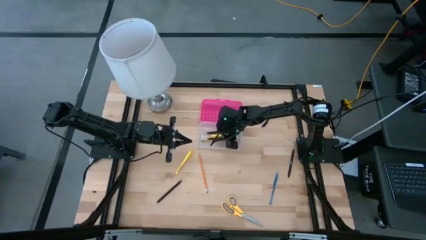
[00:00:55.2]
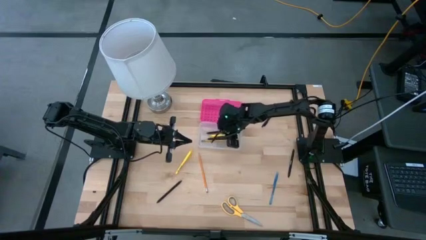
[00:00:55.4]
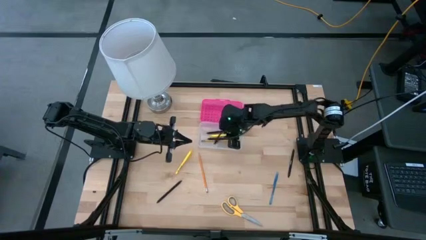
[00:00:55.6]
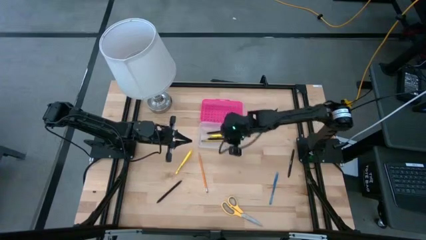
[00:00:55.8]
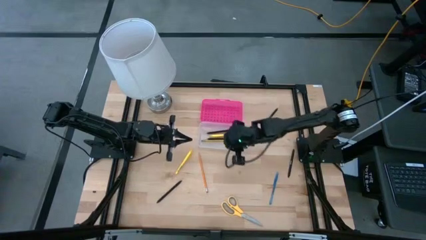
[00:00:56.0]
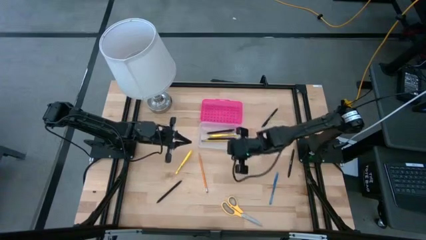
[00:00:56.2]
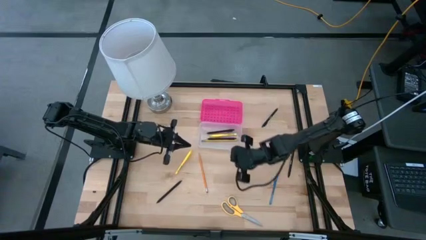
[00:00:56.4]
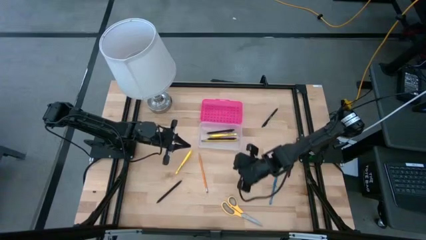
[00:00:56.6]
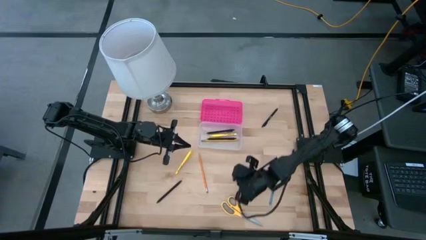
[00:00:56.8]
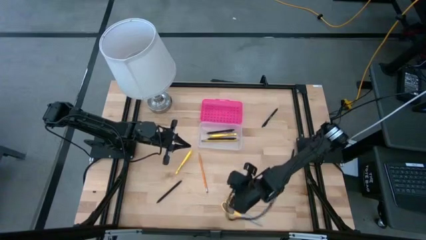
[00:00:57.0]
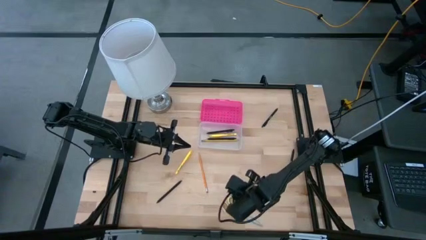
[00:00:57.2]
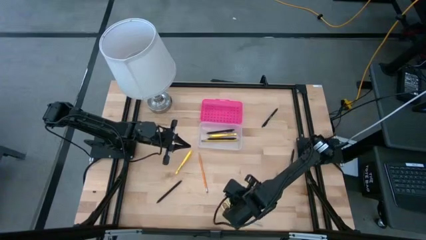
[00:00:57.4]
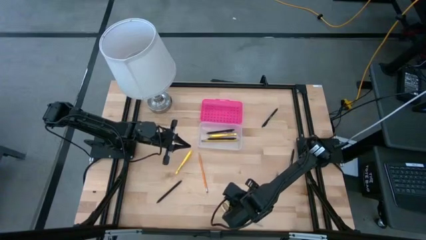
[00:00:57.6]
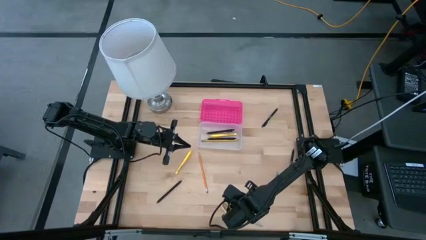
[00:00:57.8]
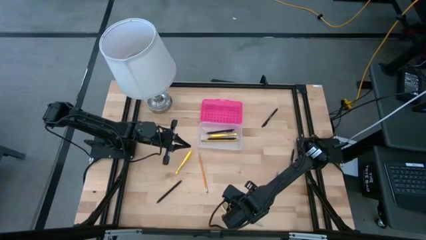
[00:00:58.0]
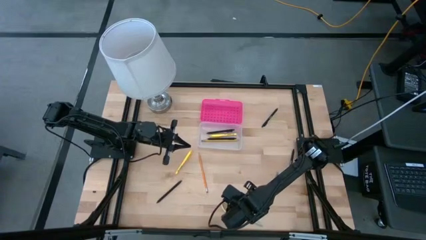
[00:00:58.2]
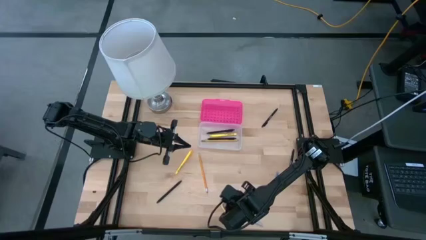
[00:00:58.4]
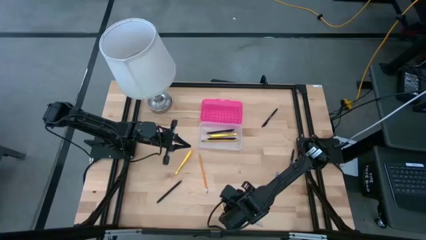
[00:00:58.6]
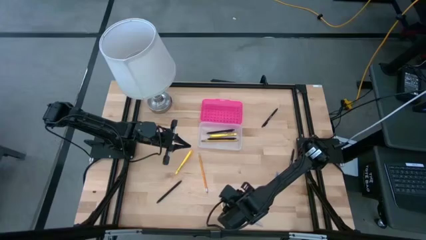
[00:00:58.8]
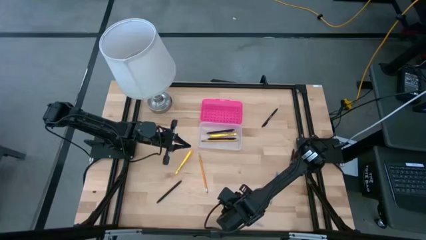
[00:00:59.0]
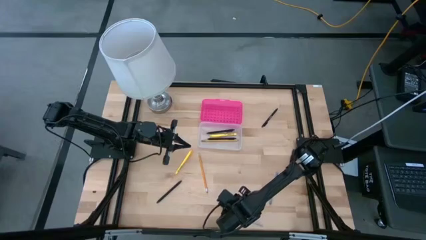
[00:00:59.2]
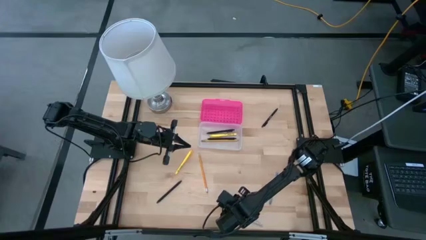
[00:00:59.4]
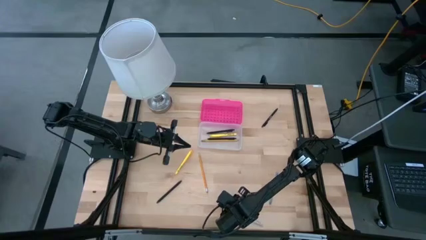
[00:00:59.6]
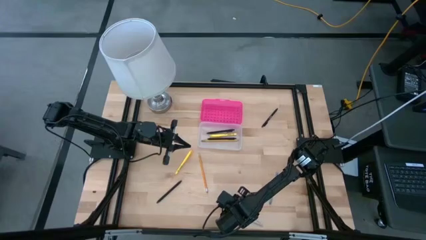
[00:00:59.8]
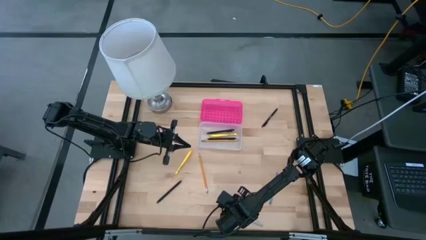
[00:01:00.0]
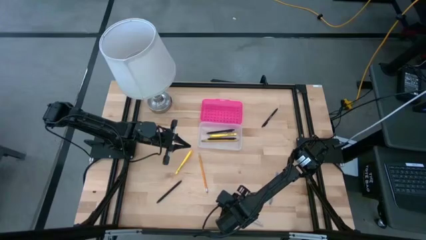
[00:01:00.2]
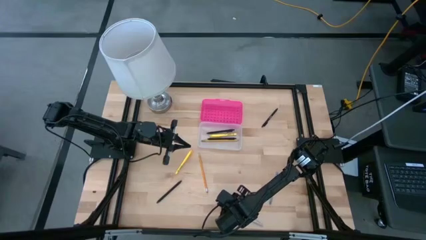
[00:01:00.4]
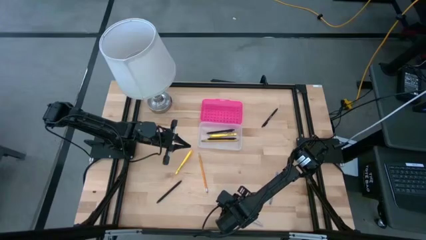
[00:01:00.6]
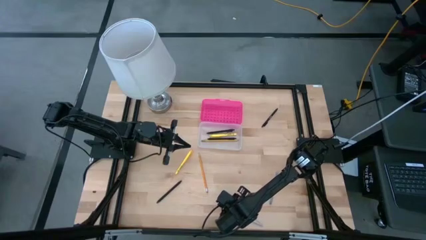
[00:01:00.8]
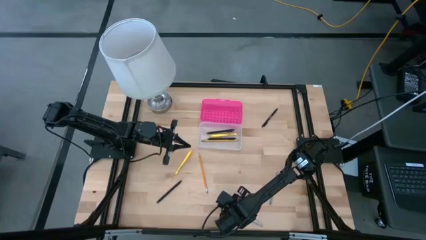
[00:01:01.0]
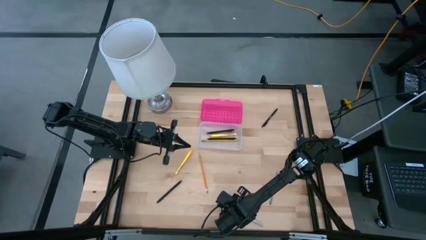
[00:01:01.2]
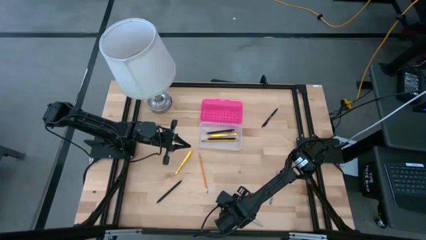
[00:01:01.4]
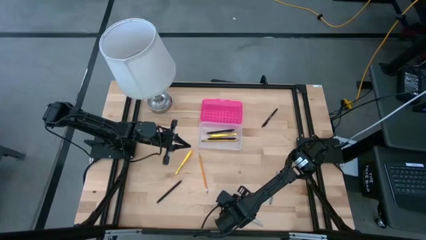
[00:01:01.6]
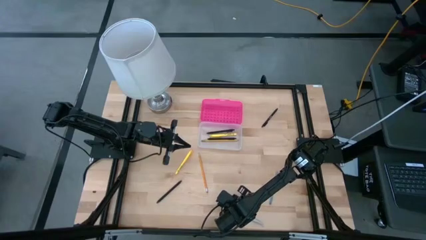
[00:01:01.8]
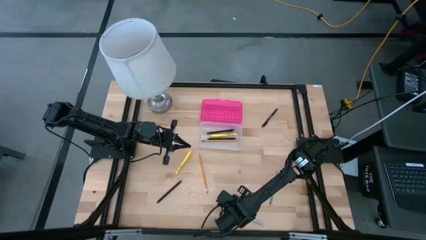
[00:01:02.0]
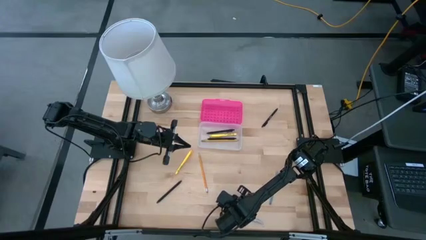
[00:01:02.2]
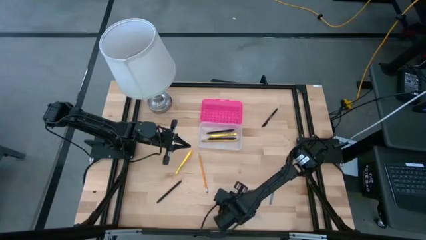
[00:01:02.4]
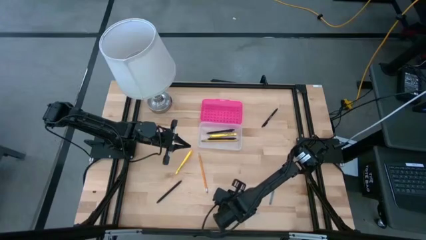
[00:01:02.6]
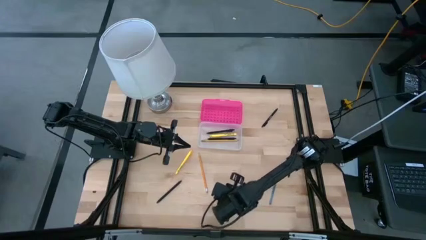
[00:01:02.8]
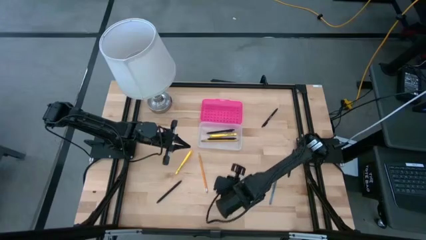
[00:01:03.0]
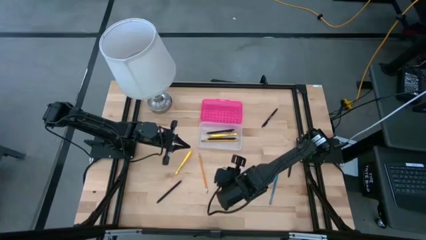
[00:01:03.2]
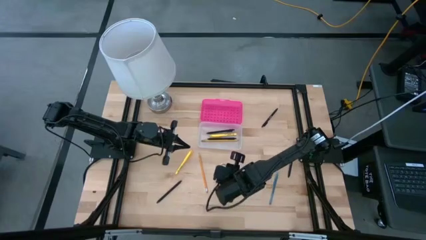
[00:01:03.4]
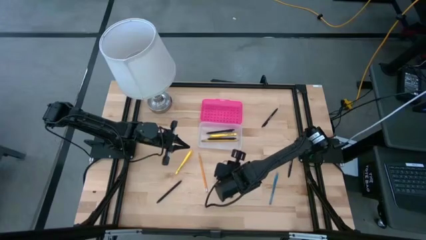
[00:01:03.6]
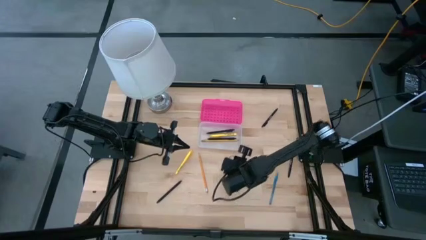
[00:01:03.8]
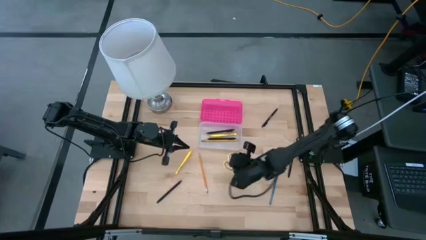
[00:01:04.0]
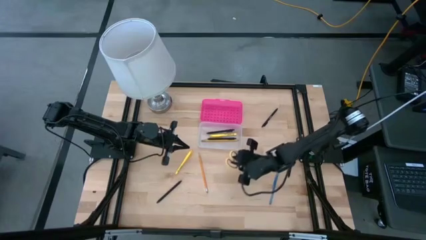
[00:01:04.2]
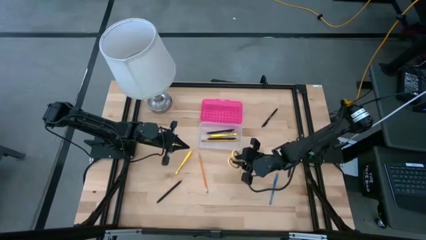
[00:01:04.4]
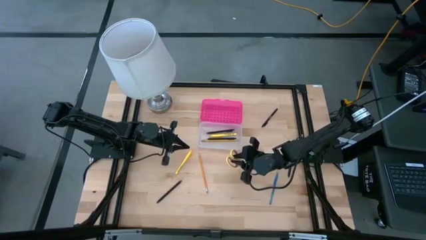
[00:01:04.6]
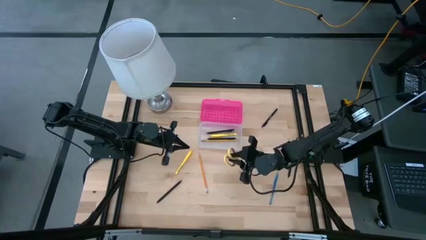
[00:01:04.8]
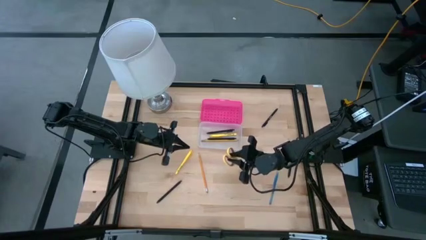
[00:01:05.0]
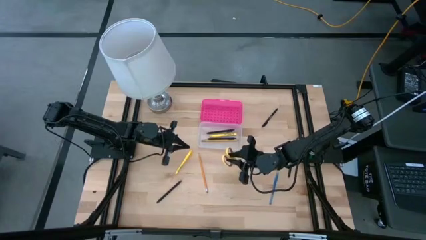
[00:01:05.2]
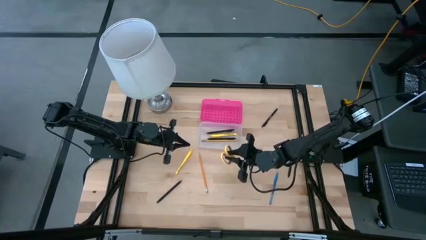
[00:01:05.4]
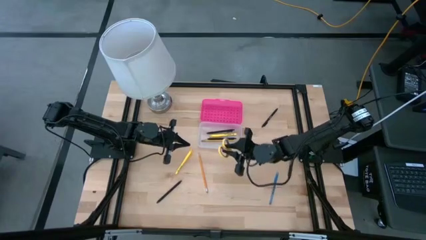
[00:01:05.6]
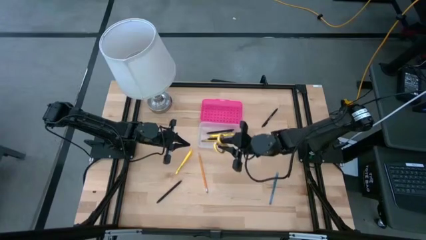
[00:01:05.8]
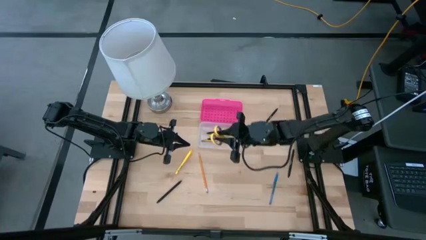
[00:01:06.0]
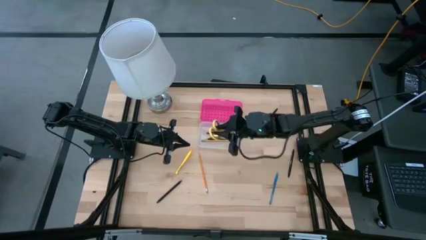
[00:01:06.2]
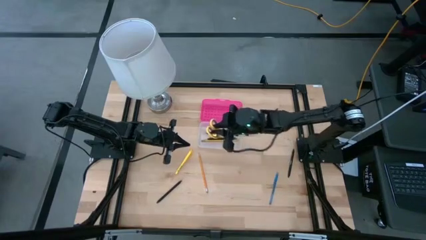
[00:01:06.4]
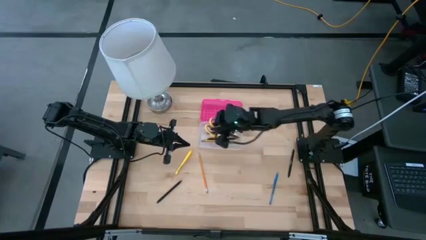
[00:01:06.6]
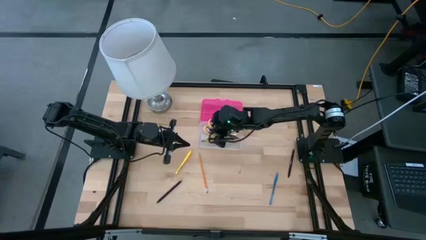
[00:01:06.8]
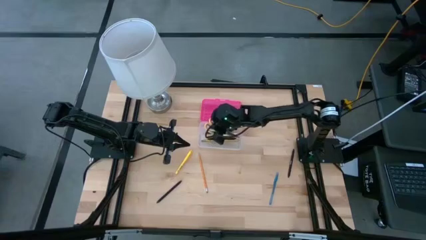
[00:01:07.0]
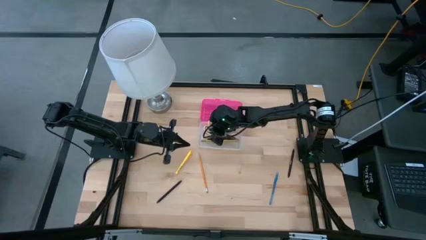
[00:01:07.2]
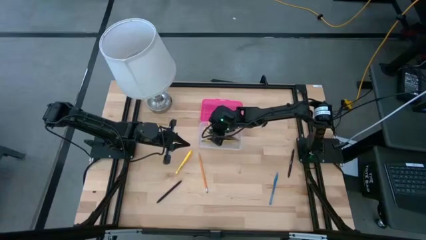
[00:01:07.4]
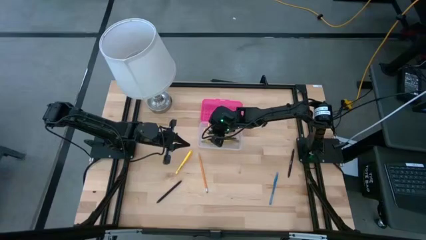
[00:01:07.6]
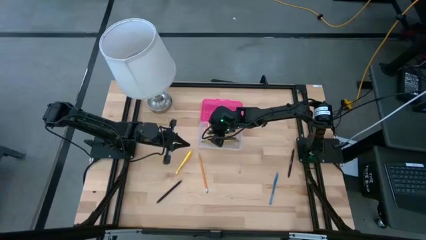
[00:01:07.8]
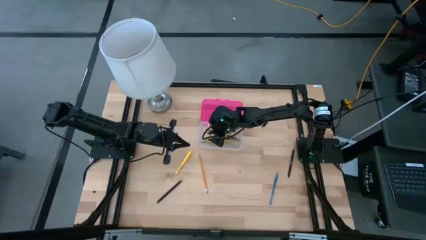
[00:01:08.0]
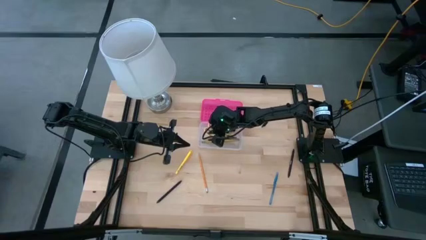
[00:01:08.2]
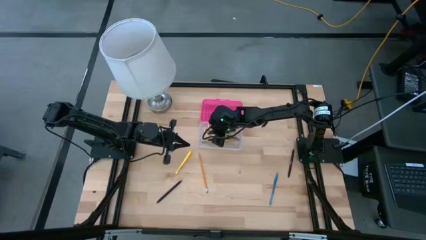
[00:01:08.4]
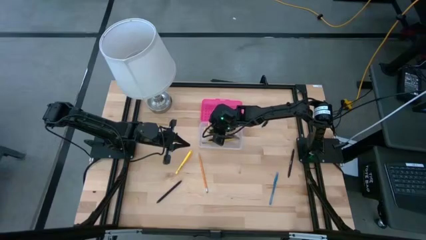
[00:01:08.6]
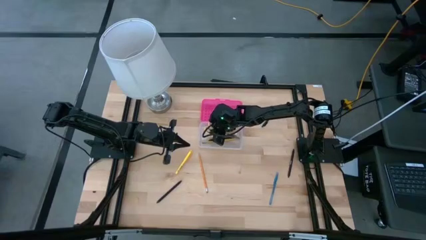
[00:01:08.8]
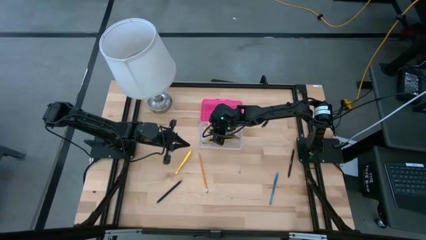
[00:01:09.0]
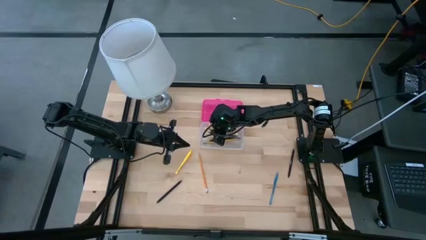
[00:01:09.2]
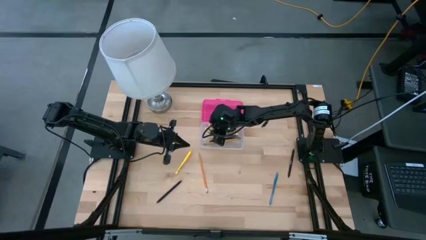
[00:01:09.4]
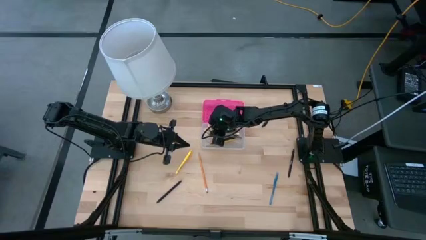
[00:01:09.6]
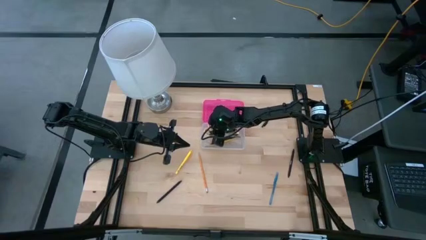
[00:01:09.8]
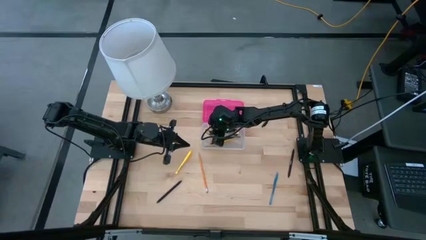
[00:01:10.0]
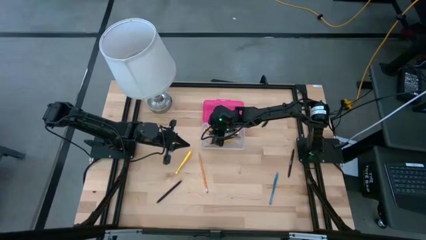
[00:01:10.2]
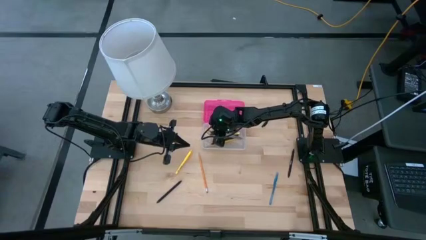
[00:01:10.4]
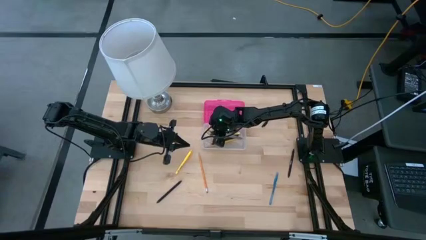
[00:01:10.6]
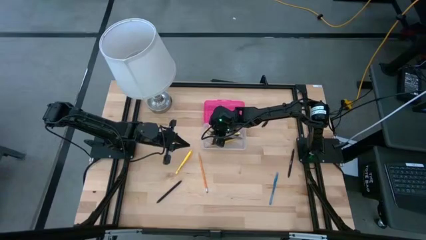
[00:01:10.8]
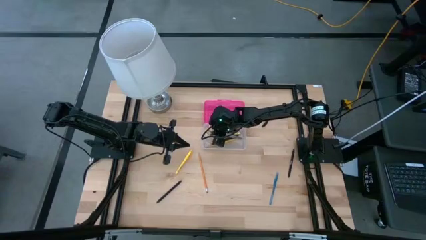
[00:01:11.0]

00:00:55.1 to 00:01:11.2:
Task: Pick & place school supplies into a supply box
Put the yellow scissor into the pink supply box
